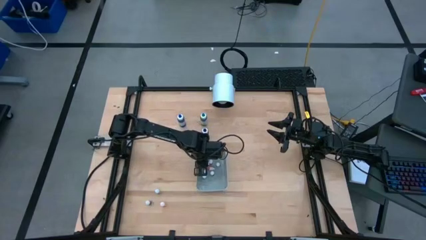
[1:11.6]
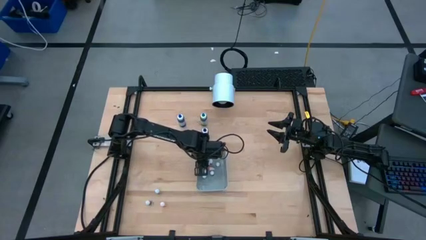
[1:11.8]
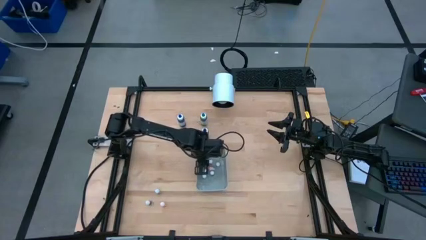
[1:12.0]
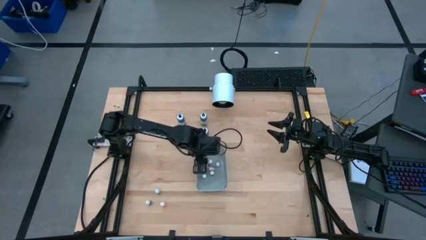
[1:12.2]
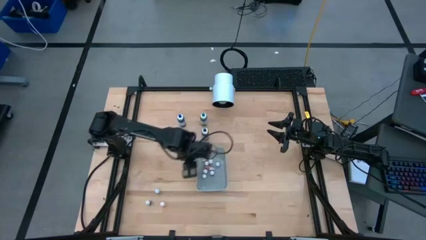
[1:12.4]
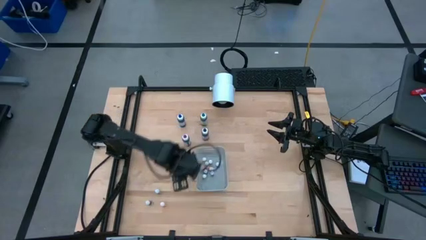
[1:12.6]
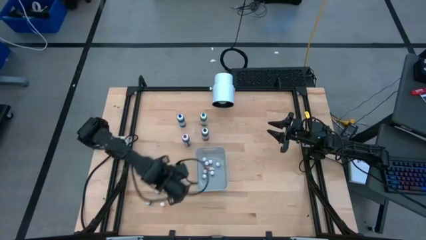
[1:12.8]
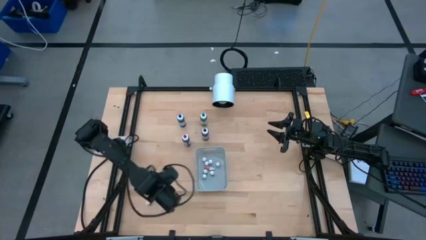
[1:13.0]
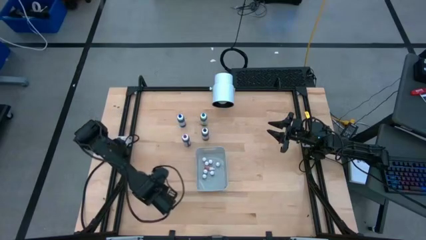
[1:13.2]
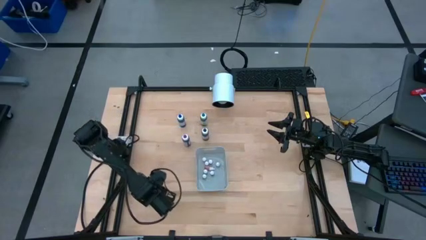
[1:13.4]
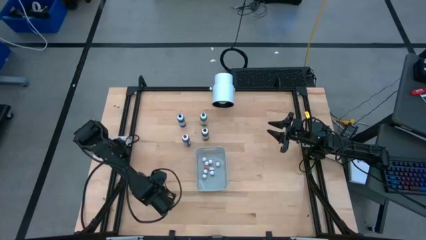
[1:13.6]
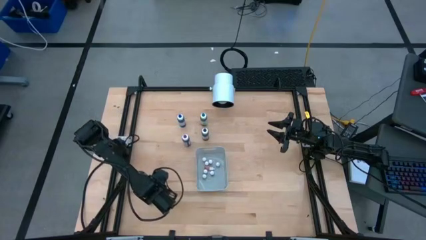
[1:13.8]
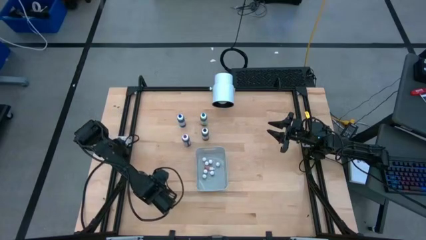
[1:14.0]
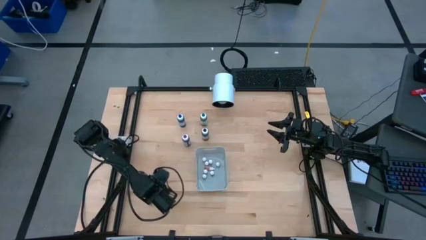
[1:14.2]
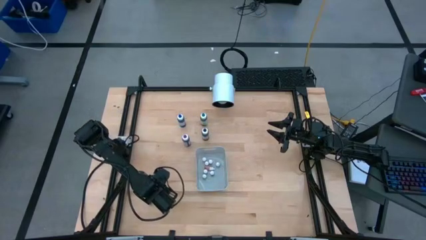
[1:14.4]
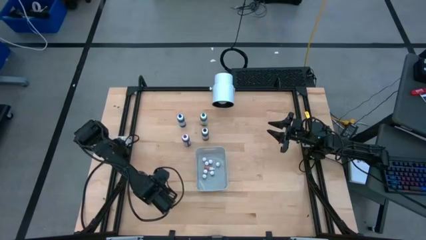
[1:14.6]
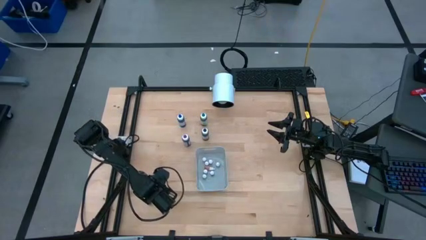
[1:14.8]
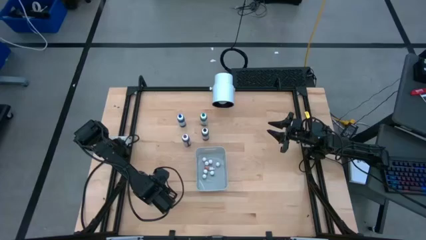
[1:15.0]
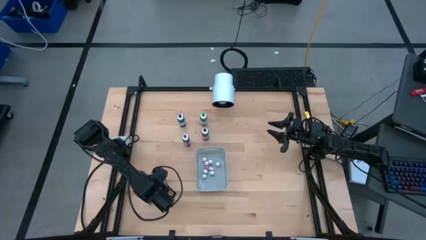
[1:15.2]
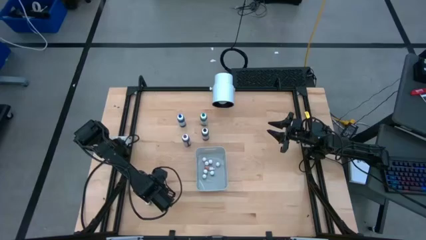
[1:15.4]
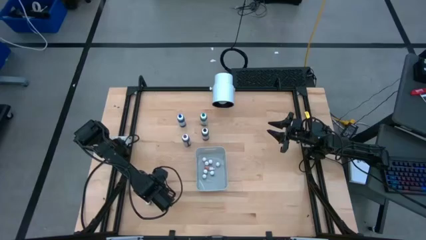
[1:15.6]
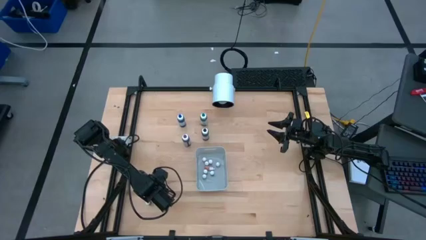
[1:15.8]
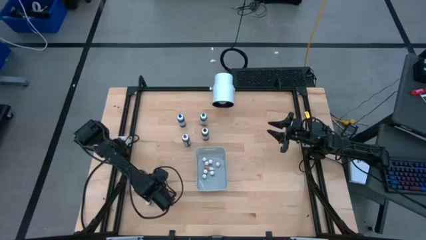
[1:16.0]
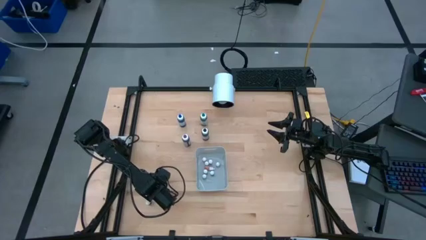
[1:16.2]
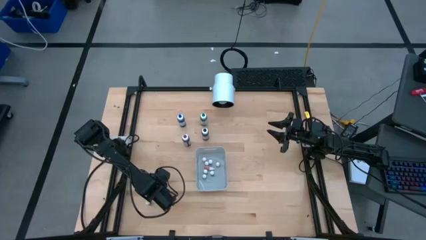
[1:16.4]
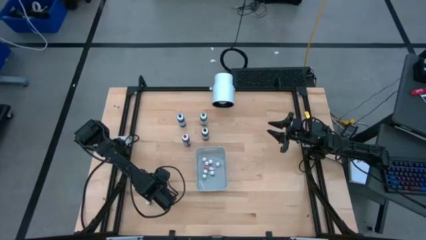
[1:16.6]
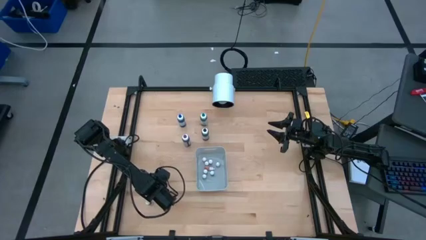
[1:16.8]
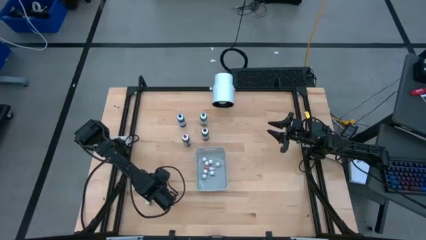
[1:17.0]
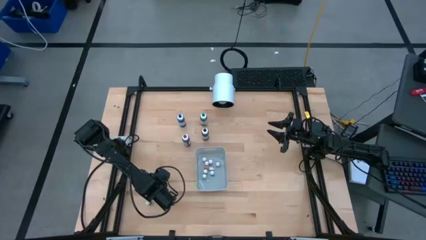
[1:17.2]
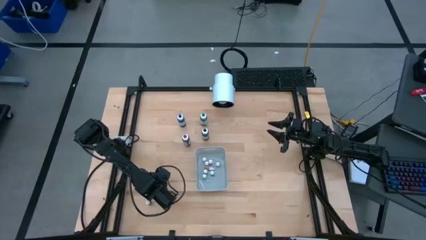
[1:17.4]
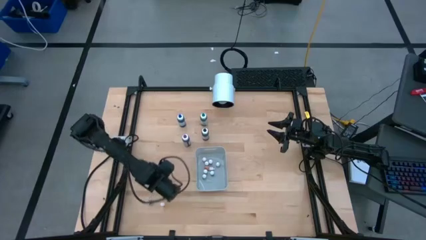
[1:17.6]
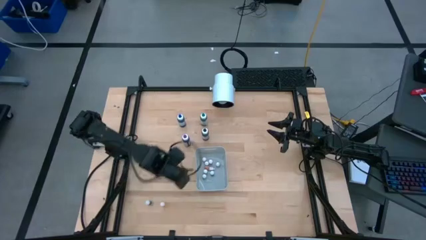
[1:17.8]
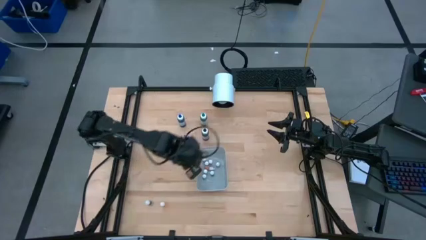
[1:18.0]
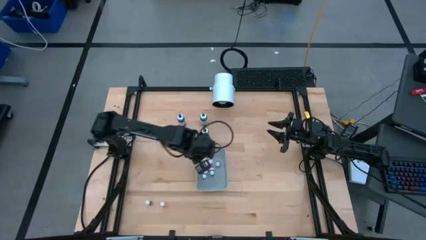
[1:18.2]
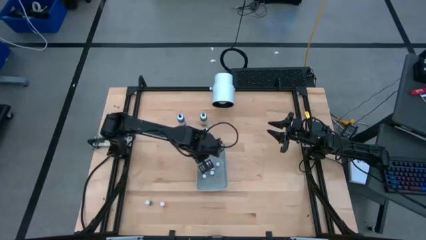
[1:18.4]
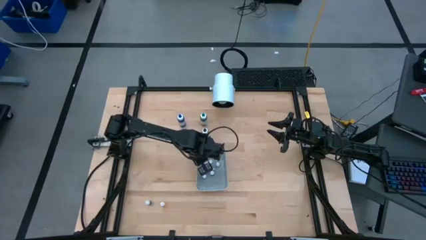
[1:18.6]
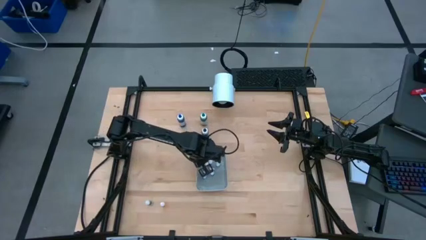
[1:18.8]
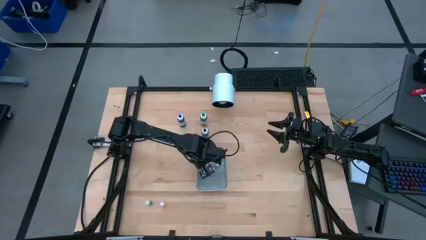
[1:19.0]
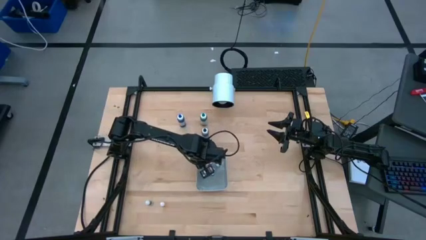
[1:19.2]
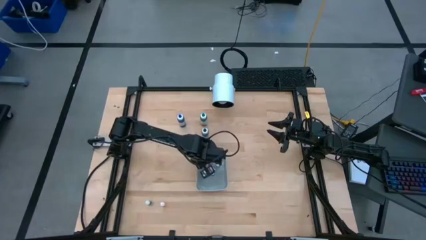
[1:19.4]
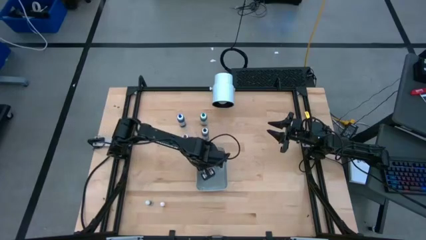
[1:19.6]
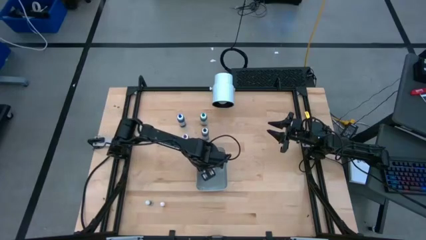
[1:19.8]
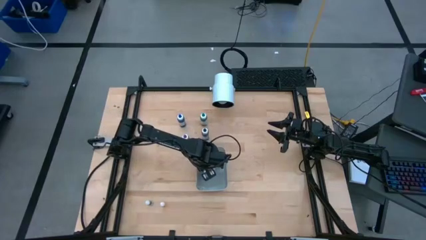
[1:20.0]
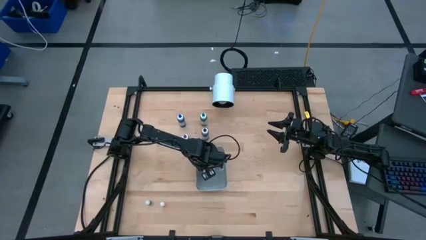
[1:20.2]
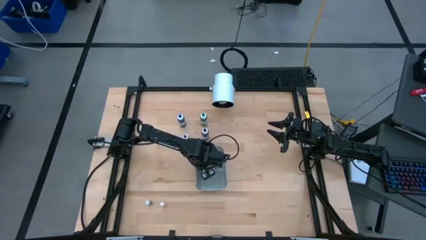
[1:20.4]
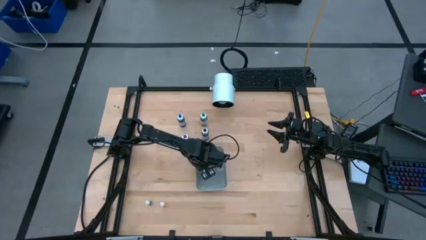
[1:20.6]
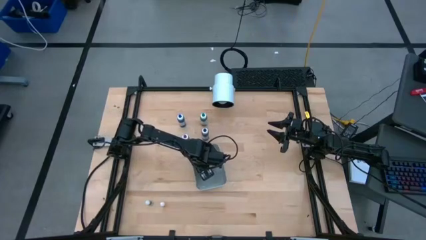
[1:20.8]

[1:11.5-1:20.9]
Task: Pick & Place food coloring
Put the small black food coloring bottle into the gray bin

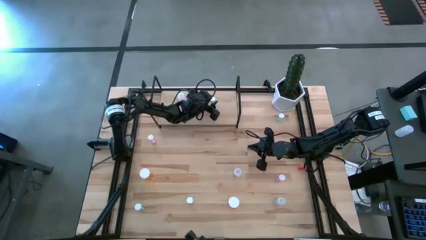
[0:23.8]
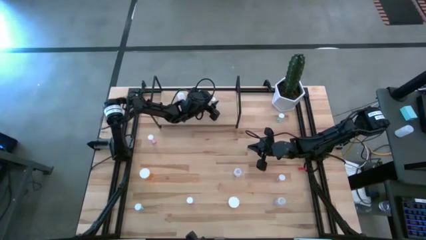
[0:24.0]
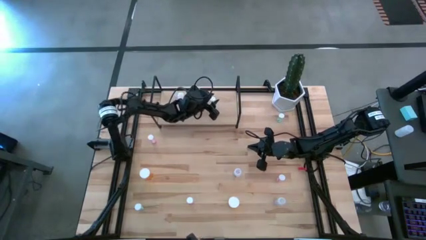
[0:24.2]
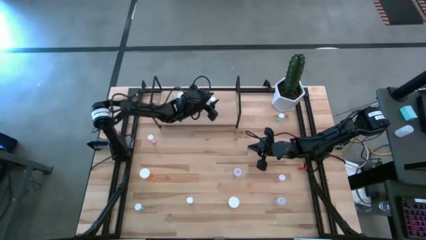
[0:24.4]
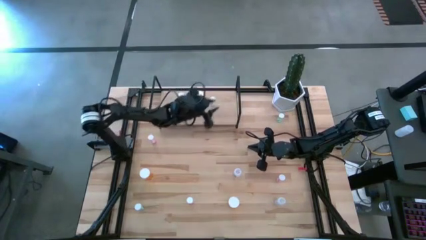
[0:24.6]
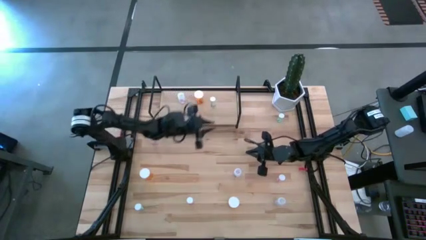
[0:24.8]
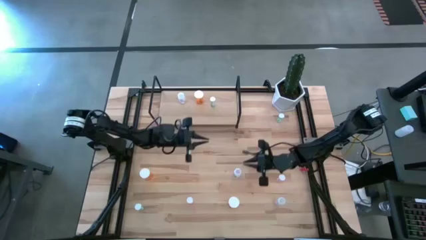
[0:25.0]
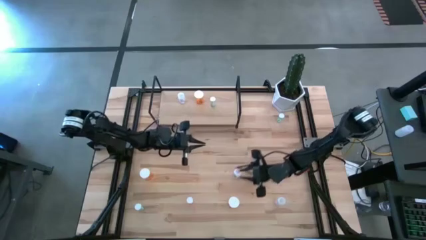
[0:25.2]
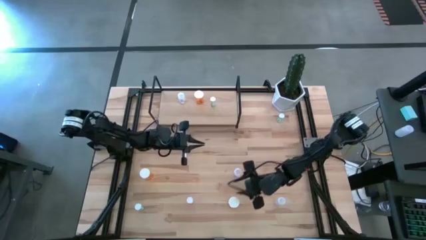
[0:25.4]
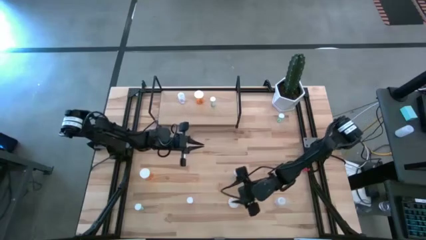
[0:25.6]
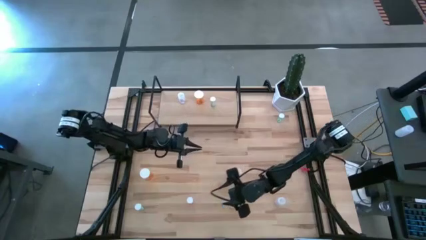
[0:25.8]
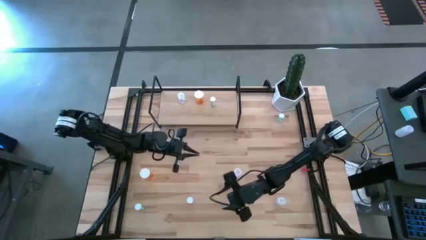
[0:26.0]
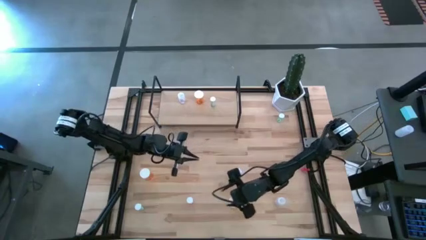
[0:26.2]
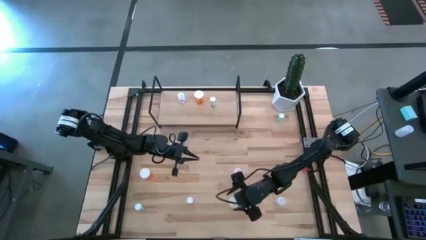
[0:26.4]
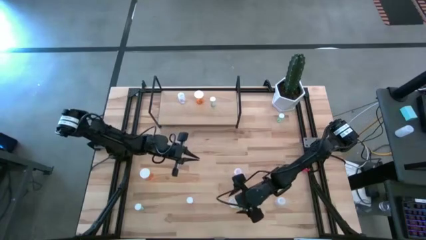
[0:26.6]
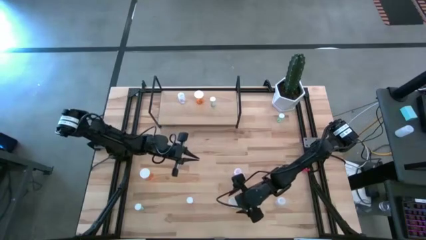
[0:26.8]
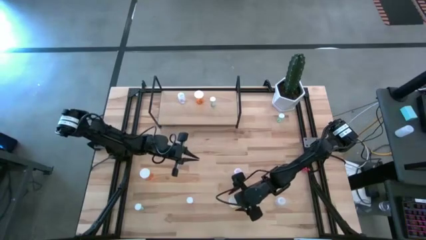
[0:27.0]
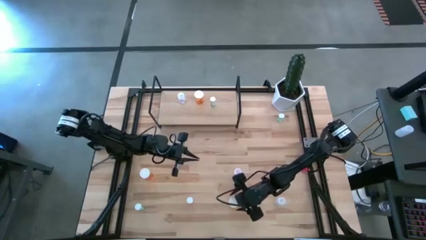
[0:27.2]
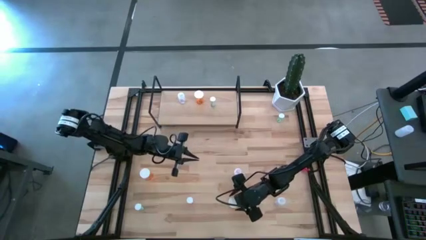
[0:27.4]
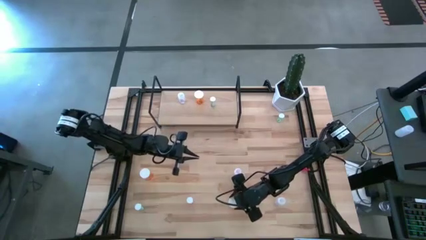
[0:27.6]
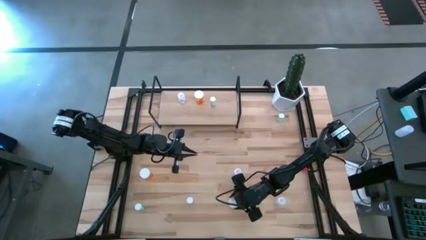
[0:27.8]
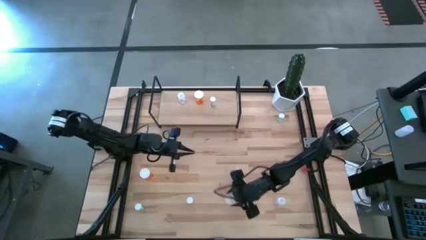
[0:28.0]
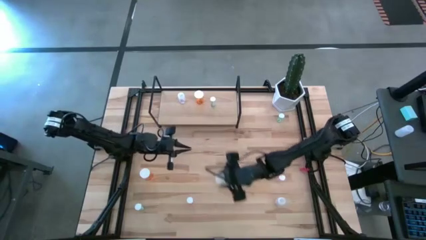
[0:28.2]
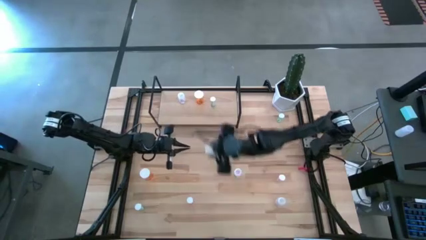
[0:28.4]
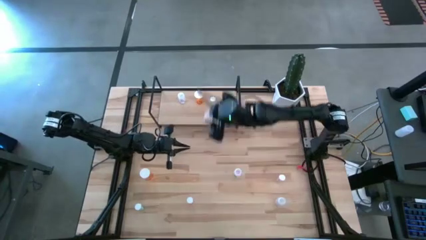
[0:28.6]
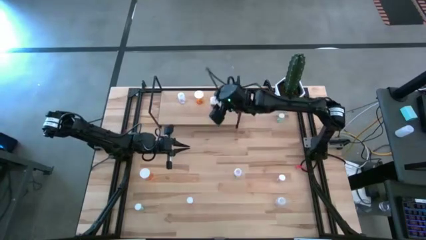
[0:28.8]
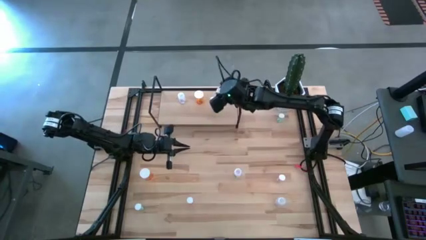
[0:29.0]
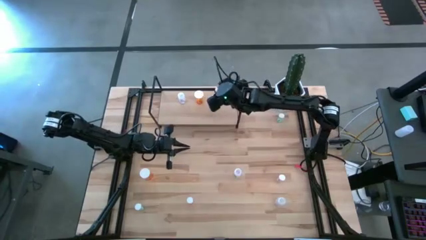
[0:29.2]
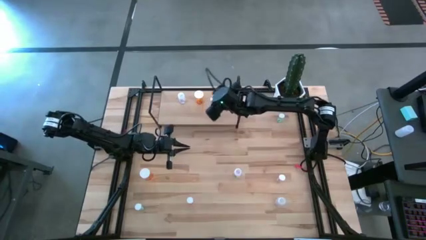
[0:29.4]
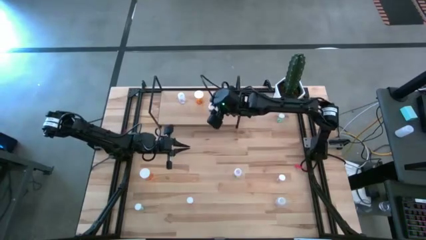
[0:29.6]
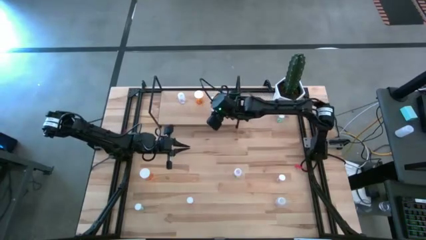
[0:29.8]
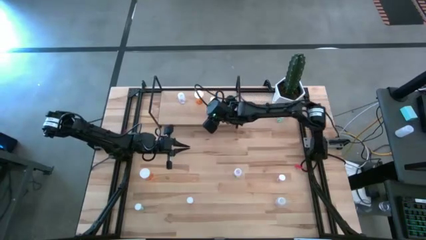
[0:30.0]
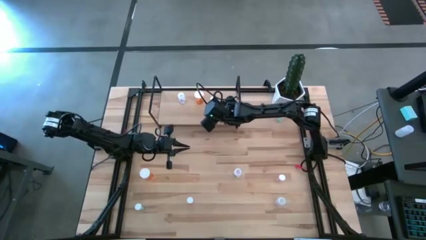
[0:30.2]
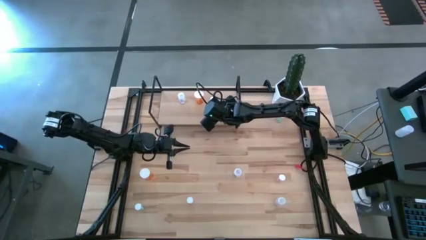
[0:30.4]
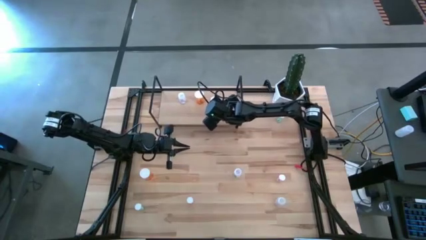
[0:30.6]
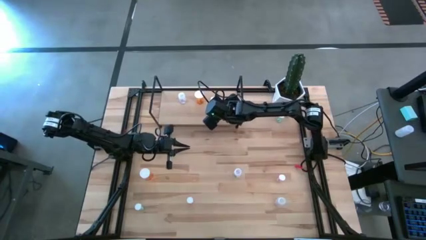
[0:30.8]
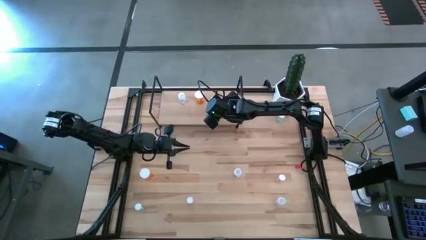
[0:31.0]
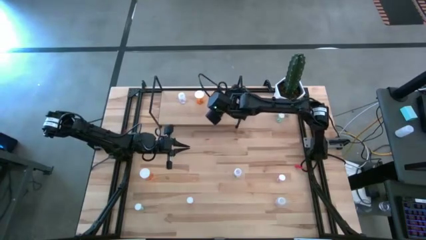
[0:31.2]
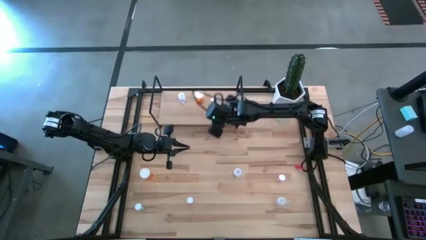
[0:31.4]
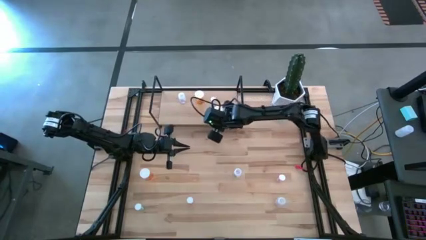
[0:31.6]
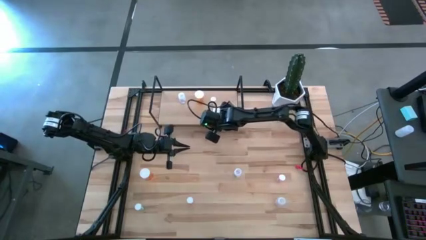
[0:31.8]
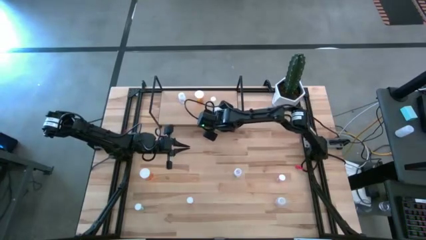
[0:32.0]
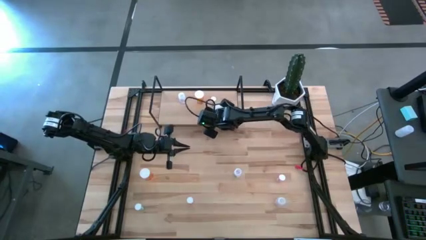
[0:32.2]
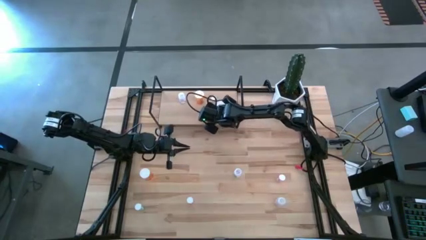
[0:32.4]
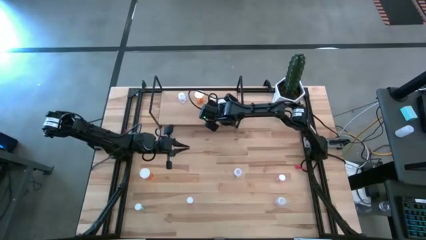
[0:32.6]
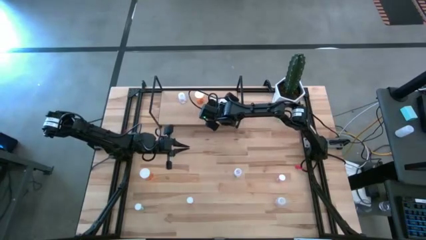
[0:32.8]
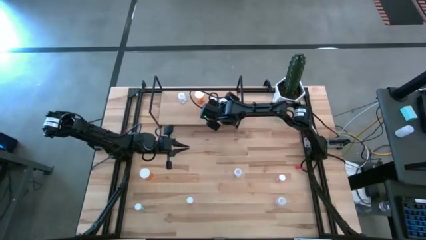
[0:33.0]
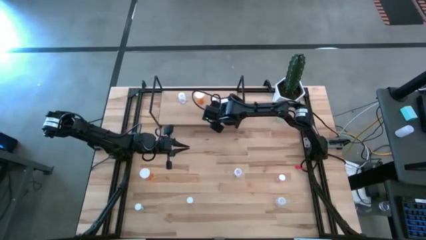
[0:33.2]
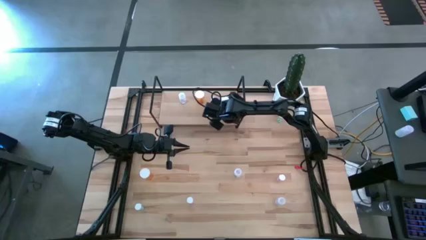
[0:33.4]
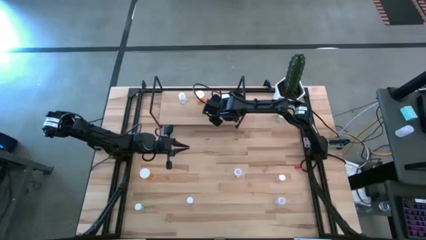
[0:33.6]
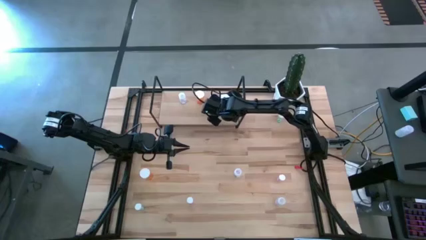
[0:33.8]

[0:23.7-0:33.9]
Task: Pick and place medicine bottles onto shelf by color
Put the bottom orange pill bottle on the shelf
